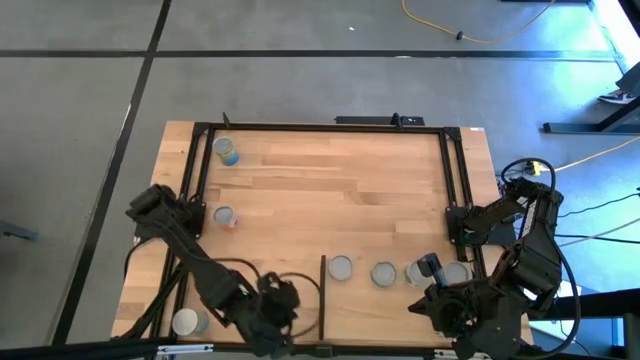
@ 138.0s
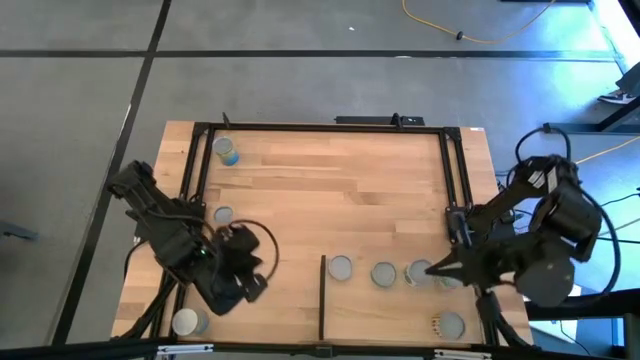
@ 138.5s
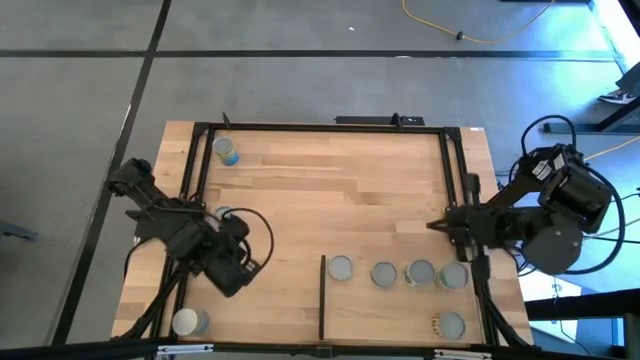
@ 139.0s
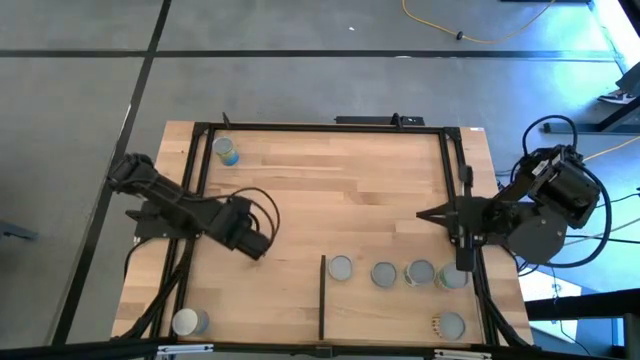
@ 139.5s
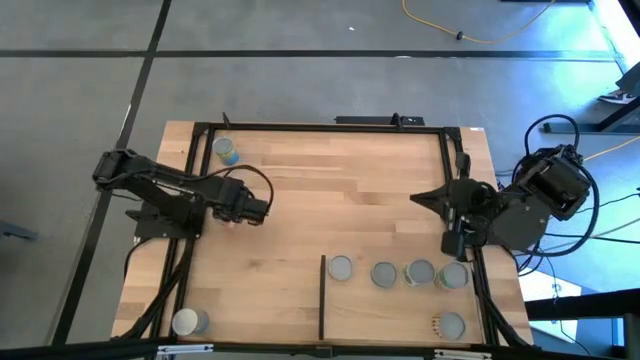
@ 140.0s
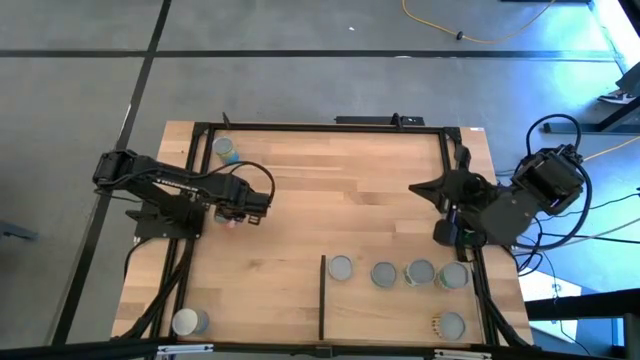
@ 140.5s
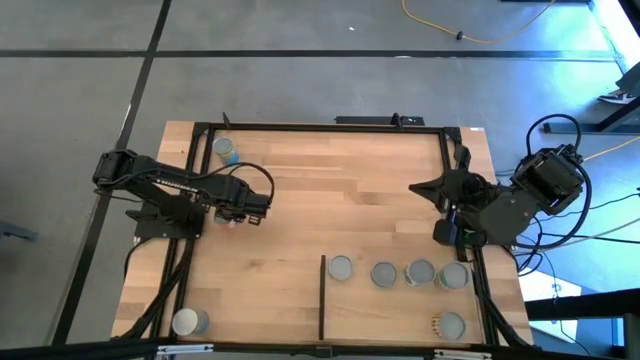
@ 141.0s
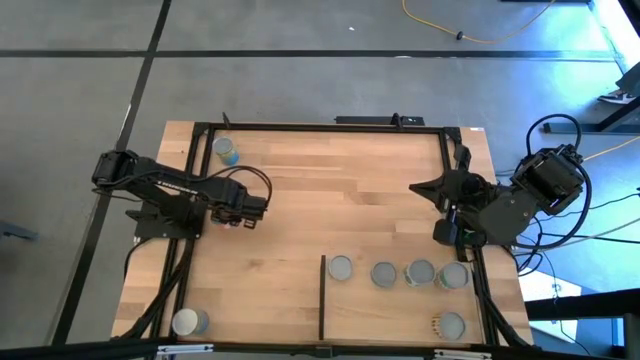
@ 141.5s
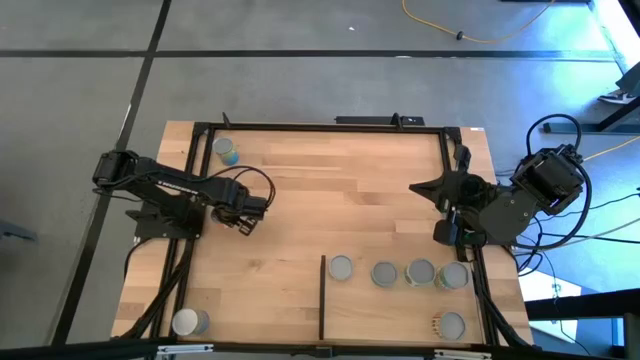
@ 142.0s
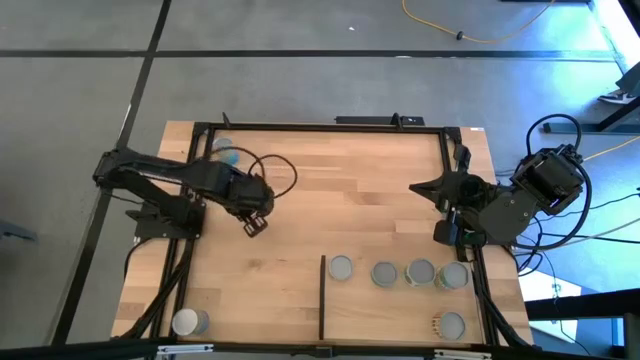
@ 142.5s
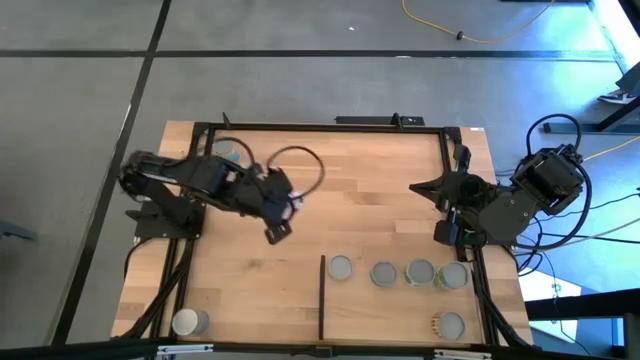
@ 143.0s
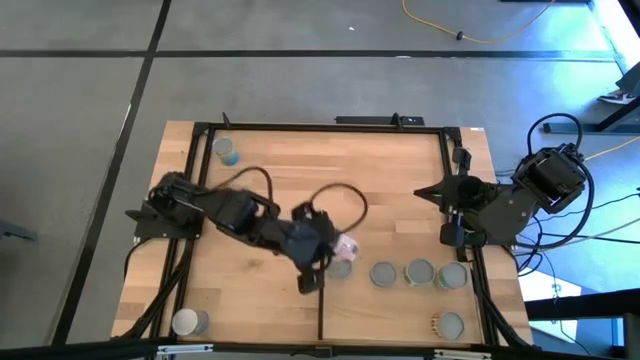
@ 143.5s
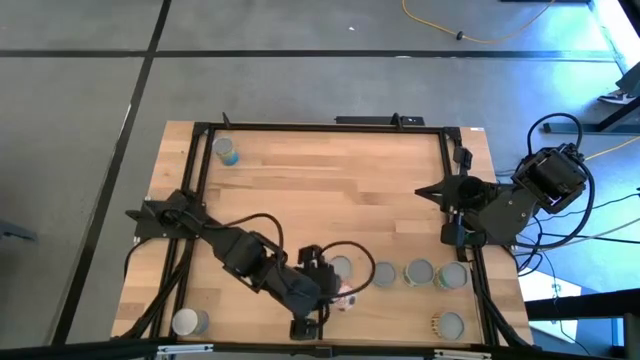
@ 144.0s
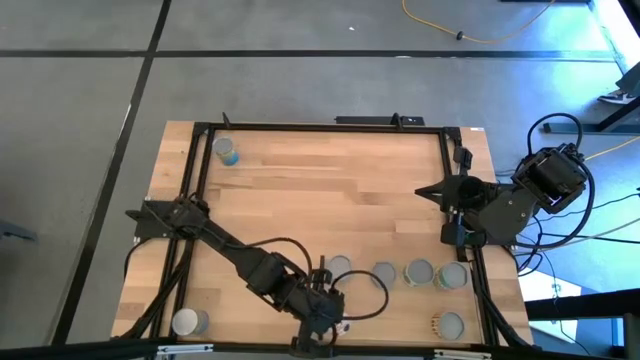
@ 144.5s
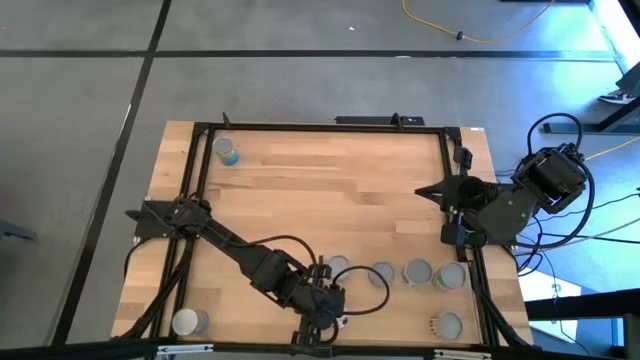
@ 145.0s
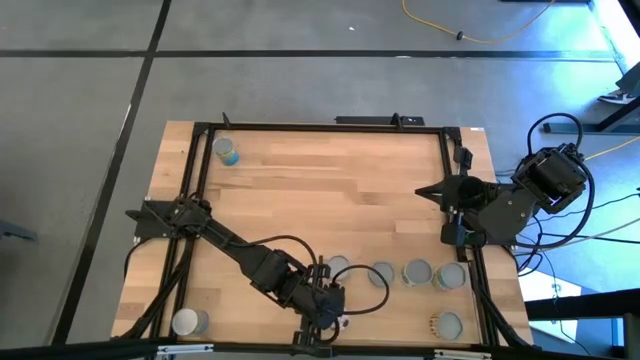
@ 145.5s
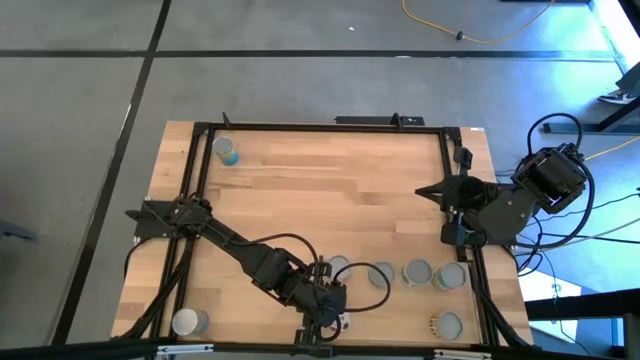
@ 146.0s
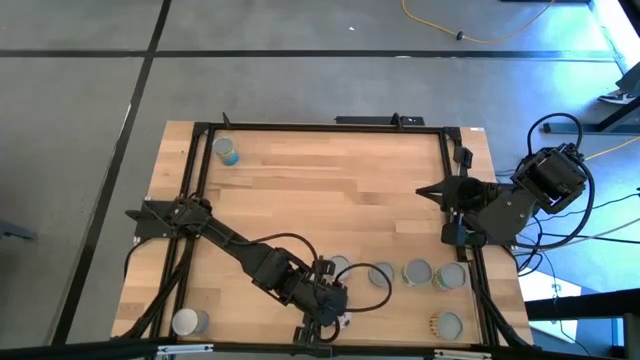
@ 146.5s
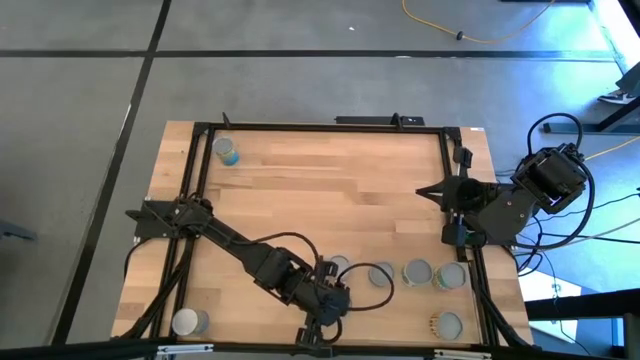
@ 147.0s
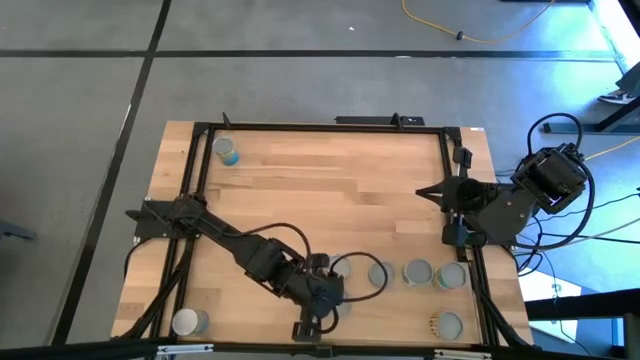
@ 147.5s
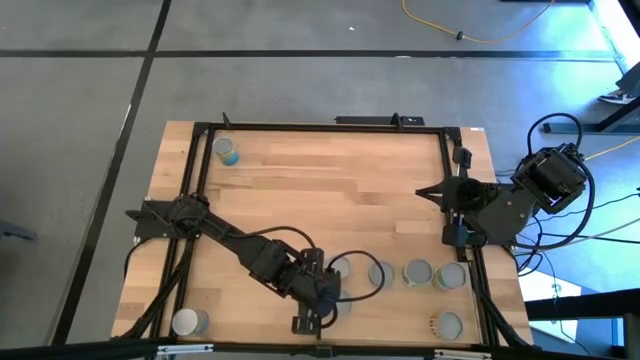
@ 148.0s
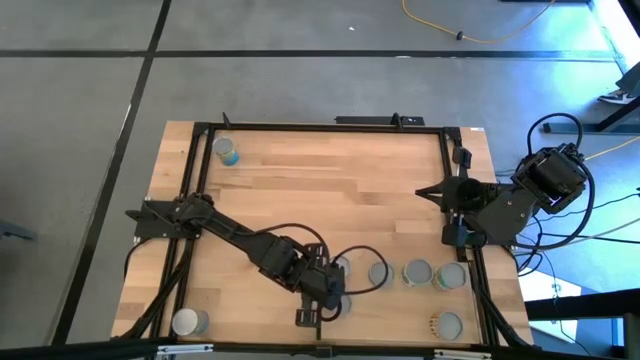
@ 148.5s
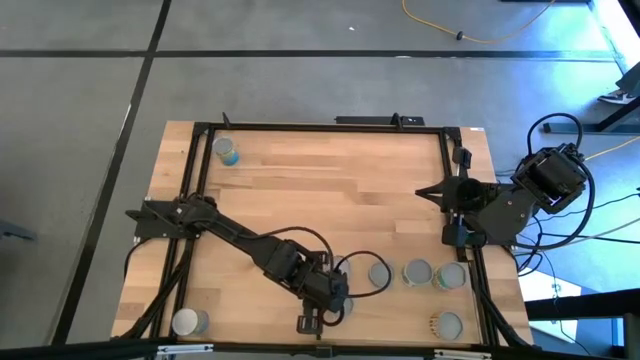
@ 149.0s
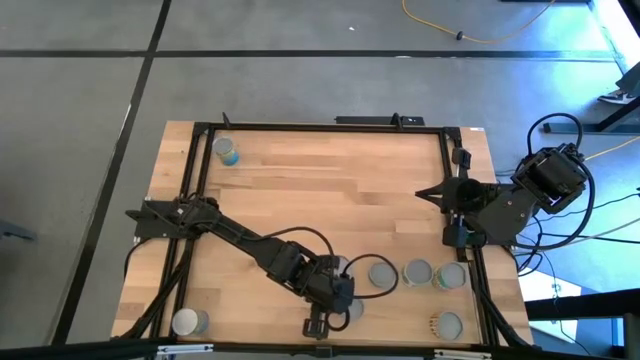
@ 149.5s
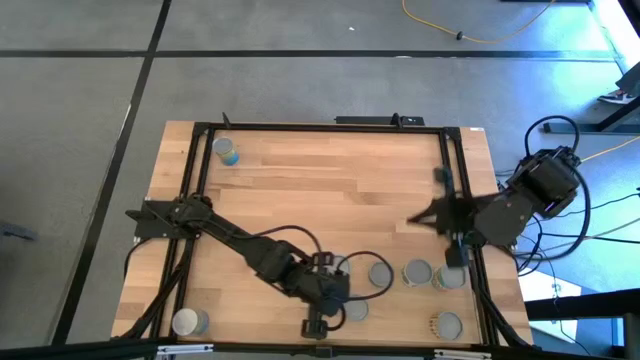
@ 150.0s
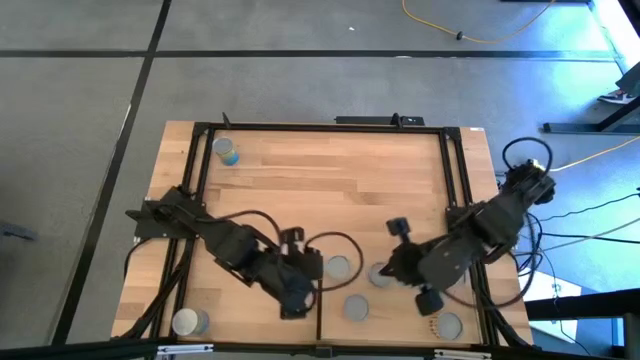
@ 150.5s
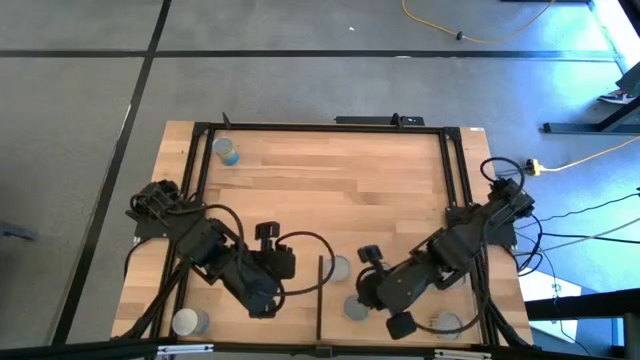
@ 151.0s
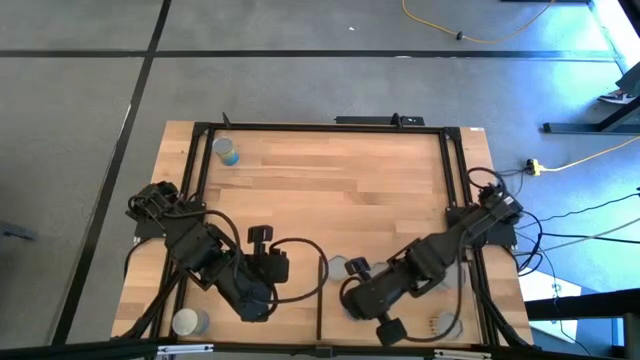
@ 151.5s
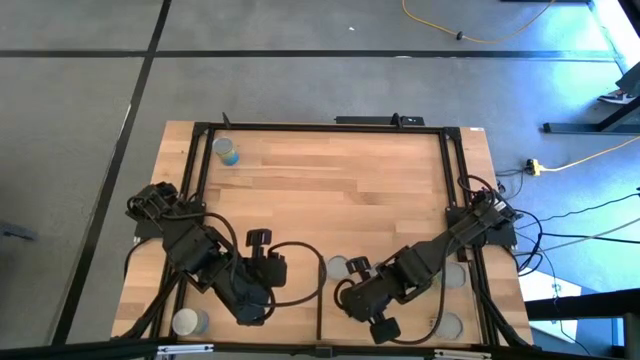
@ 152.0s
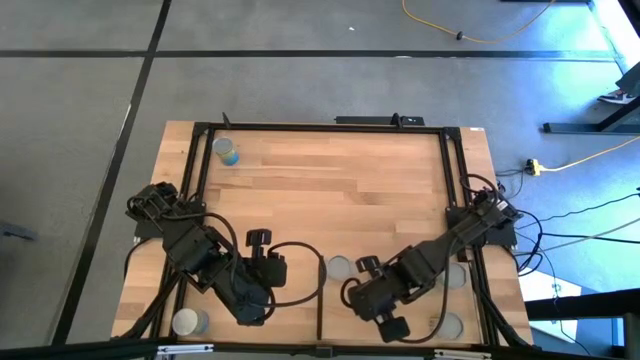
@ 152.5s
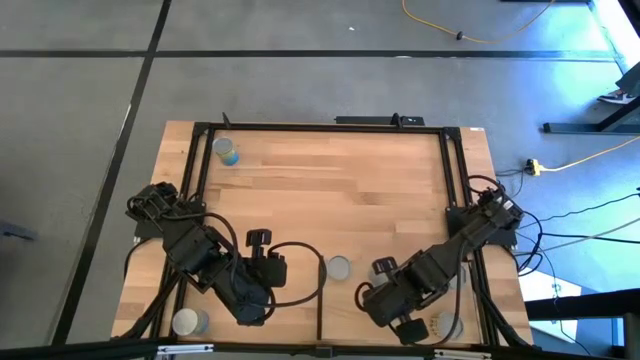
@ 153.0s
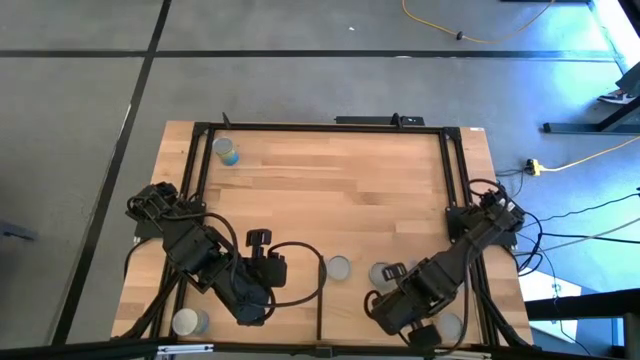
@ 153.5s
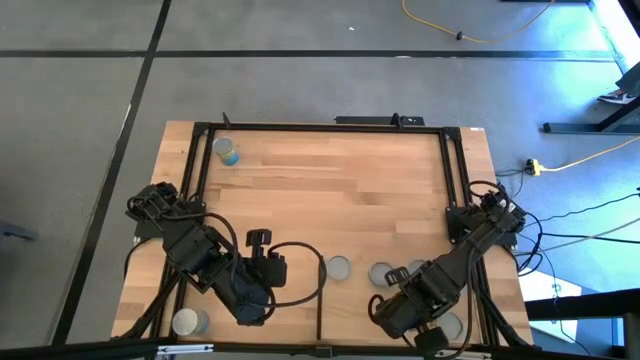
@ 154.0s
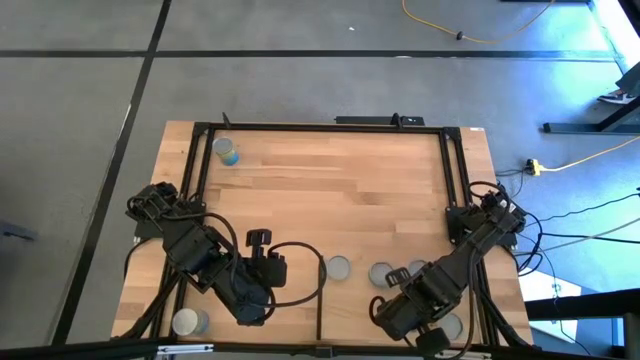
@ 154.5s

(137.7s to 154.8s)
Task: Pick and place cans onto a shelf
Put the orange canned meatballs on the shelf aligned with the other white canned mixed vegetables

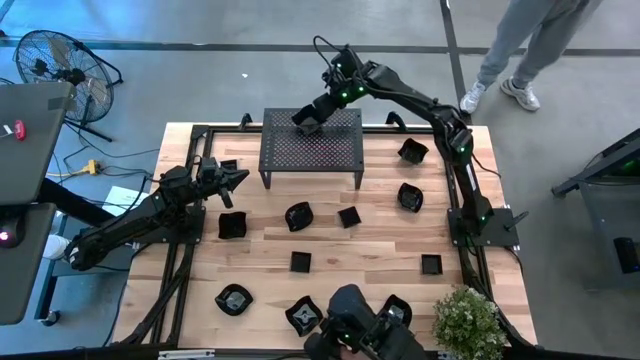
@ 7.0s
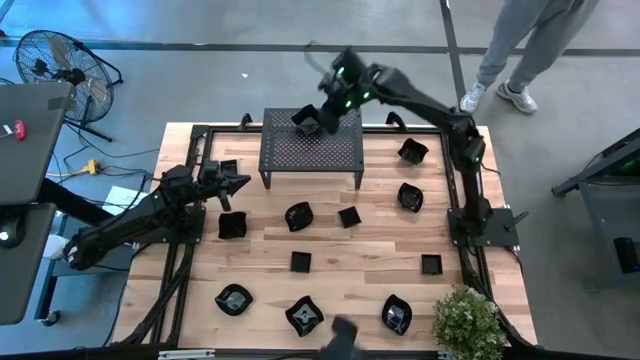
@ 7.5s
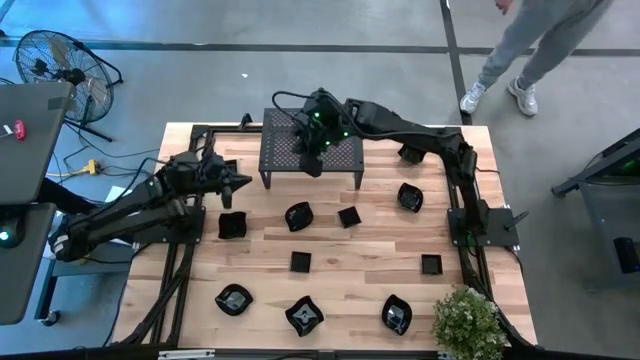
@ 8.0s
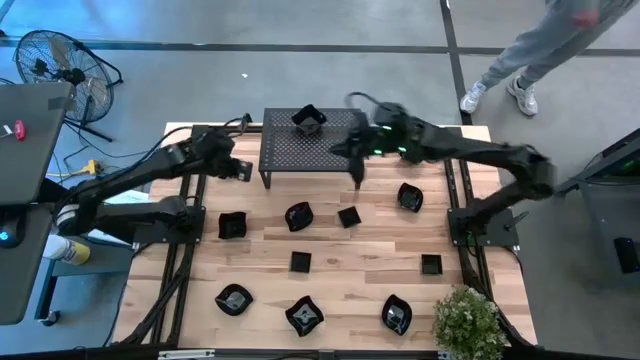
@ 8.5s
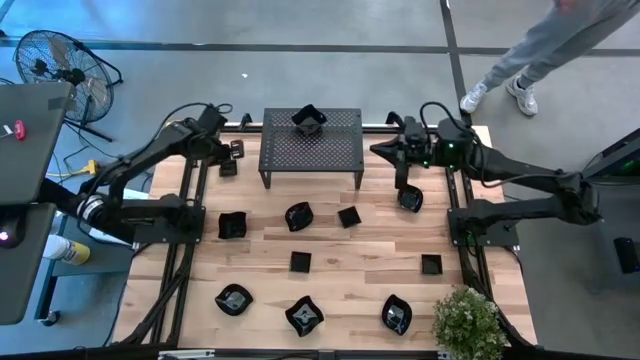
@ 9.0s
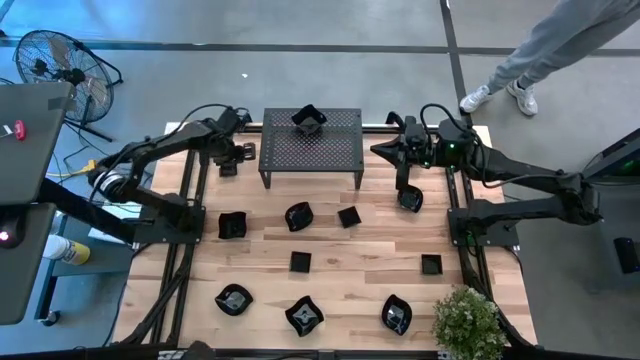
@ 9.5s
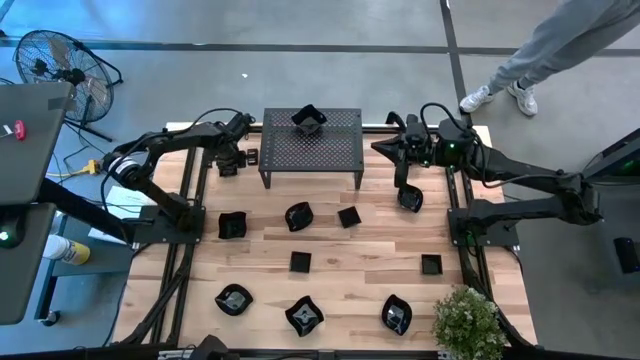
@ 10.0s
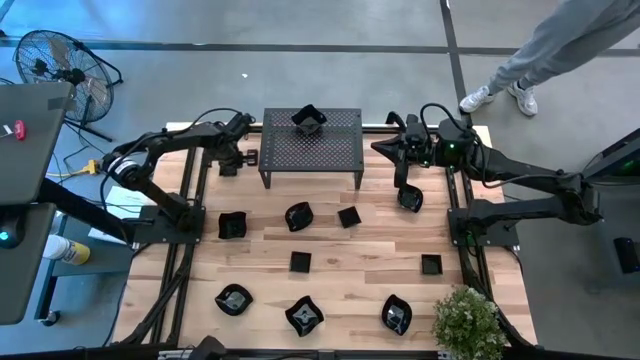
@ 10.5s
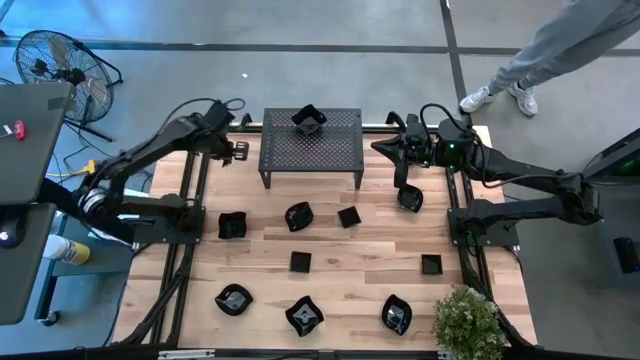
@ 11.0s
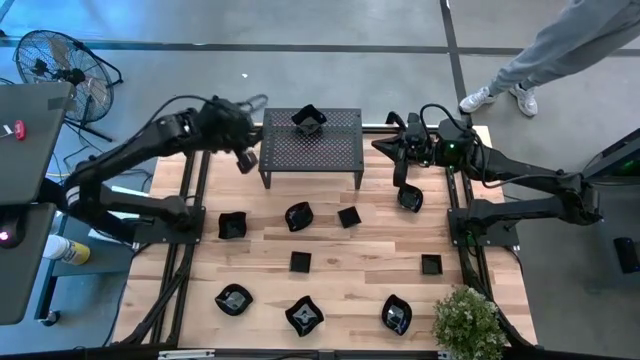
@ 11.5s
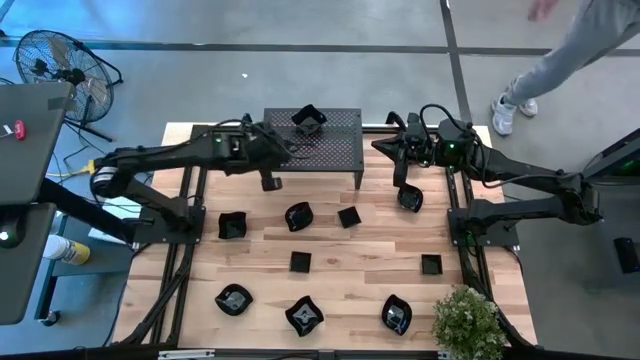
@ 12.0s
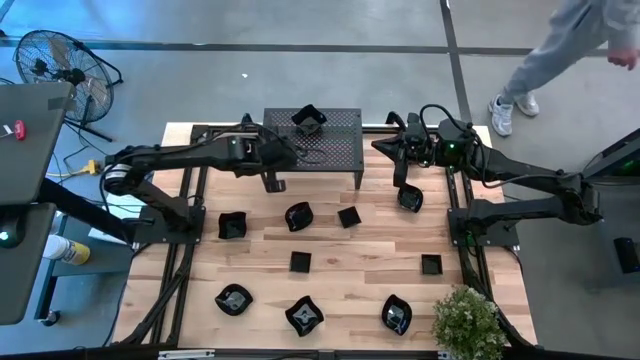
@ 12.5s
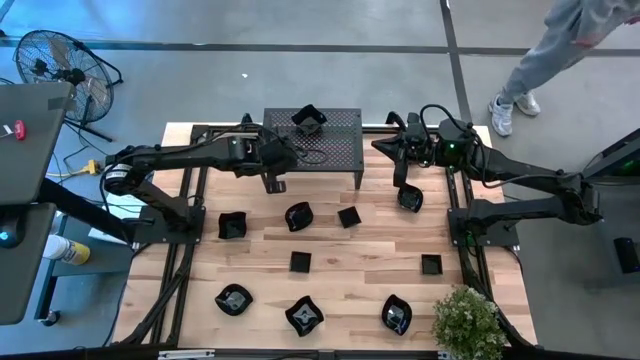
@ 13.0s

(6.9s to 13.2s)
Task: Pick & Place Mini shaped plates
Put the black square plate on the shelf
